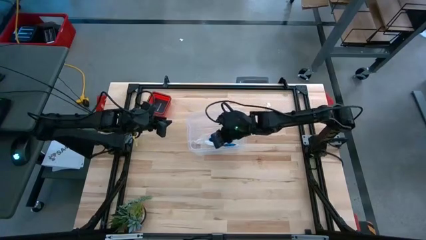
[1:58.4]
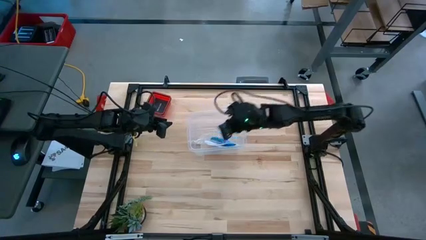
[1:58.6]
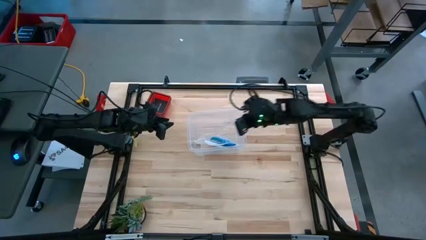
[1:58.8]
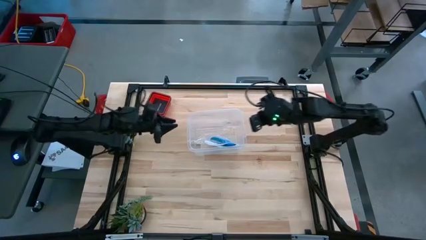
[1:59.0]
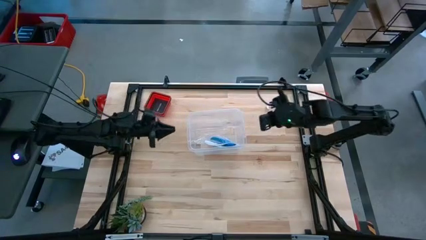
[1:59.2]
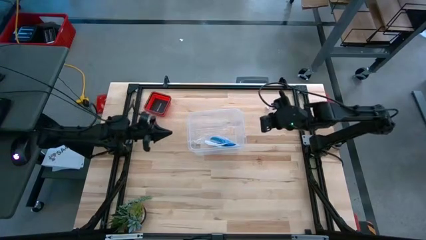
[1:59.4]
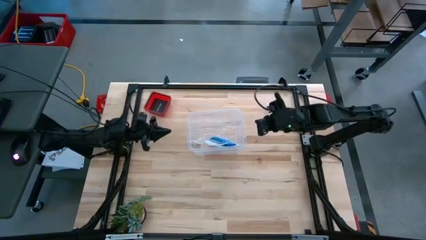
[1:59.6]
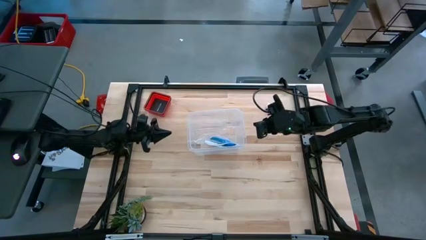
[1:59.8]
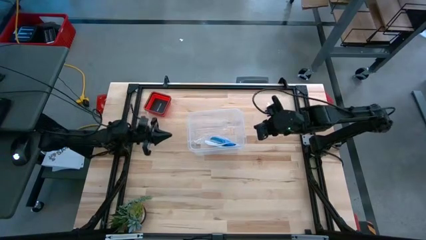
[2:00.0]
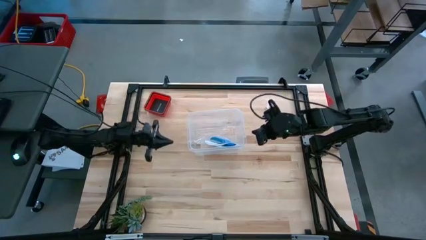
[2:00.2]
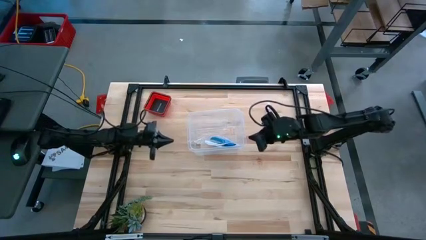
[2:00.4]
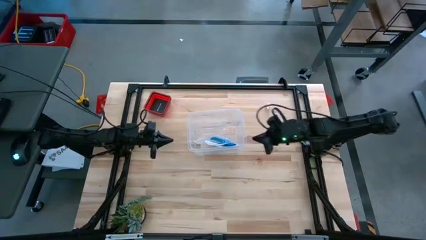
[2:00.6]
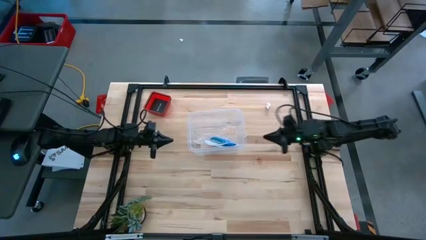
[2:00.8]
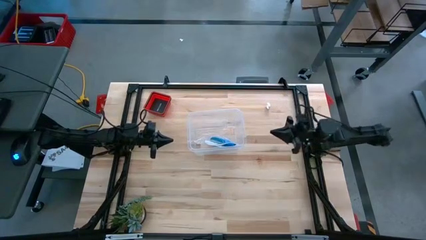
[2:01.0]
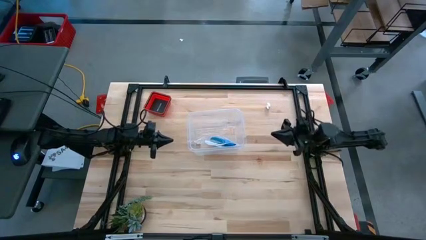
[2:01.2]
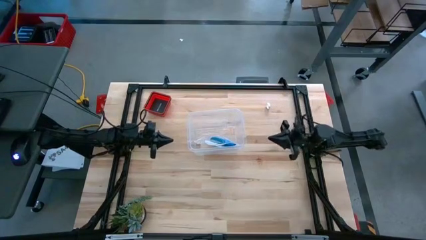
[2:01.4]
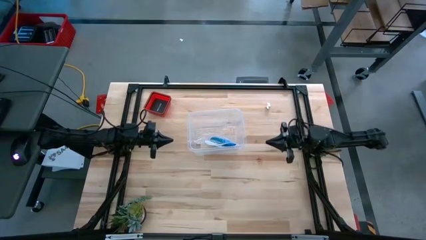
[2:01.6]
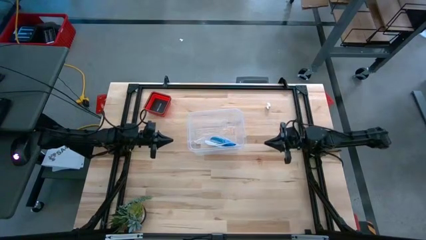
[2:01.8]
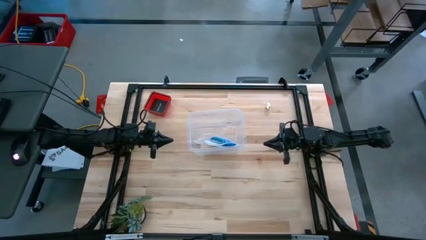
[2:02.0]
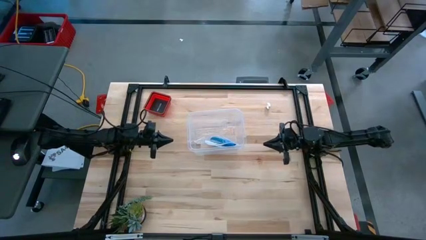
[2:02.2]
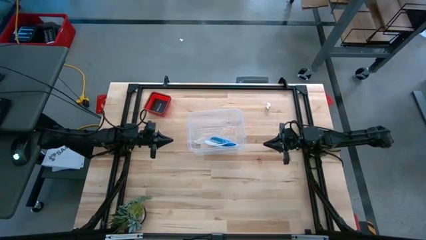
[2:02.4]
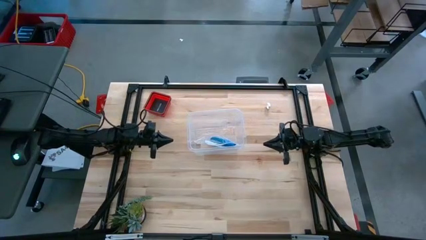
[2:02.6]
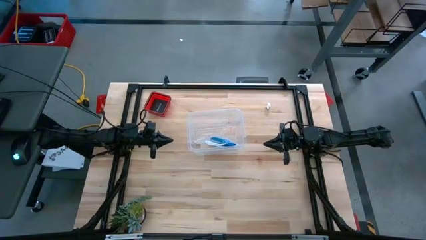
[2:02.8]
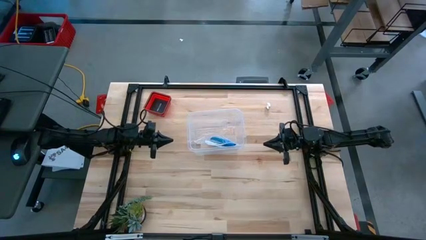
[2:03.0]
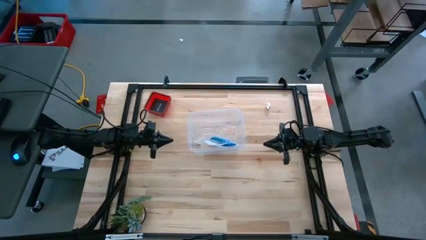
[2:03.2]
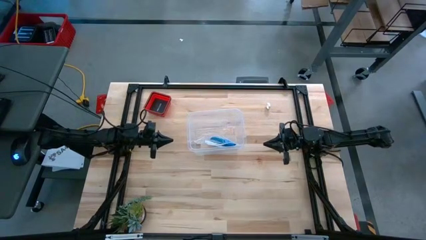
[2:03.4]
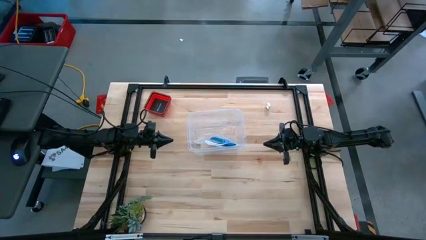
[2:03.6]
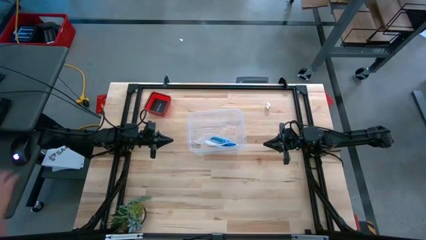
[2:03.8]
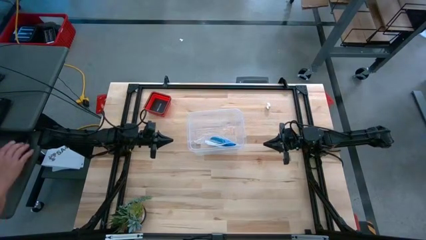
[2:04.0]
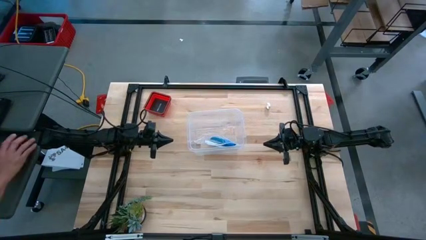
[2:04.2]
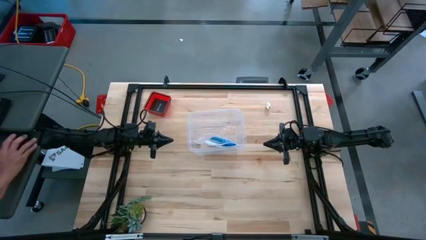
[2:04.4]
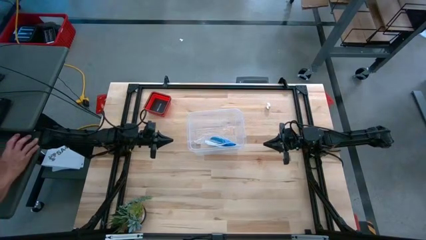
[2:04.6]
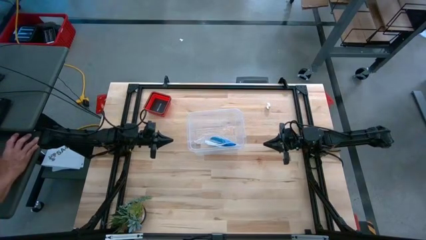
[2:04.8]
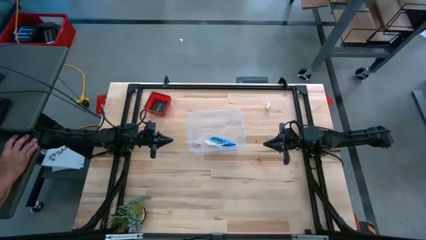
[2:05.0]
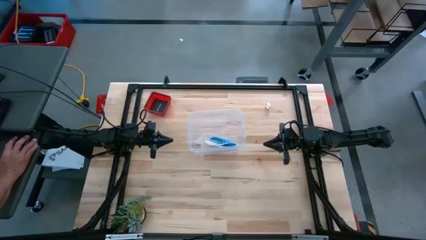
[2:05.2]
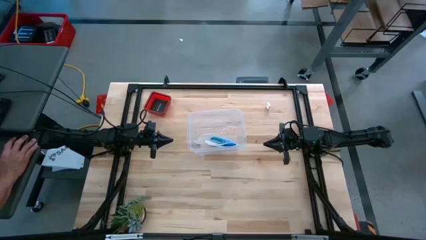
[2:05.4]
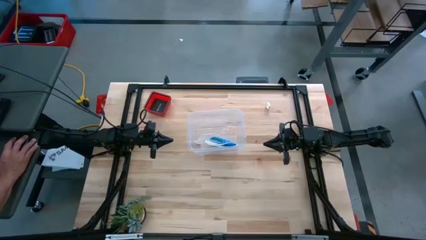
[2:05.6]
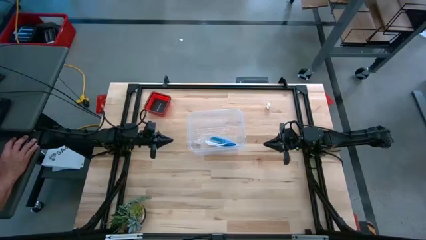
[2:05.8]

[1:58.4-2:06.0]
Task: Roll bandage
Return to Home Position

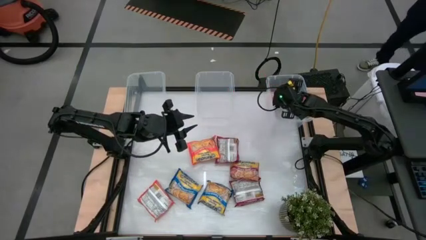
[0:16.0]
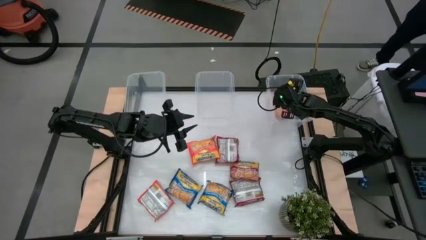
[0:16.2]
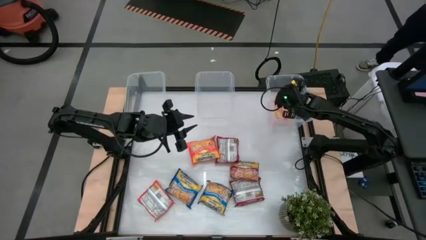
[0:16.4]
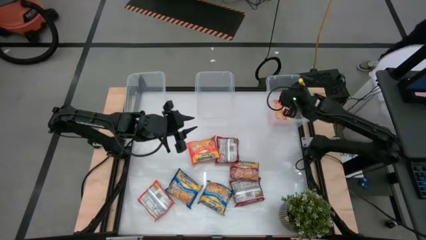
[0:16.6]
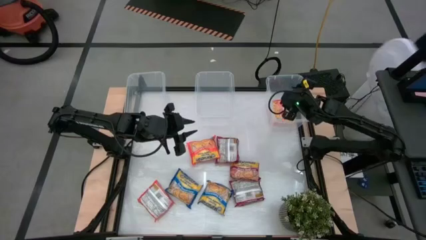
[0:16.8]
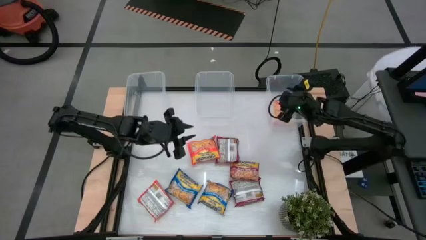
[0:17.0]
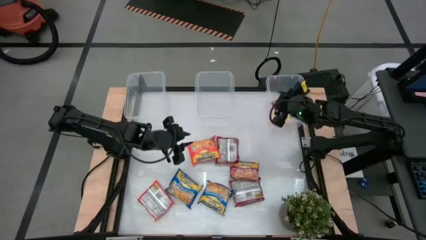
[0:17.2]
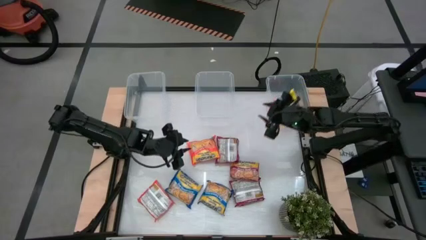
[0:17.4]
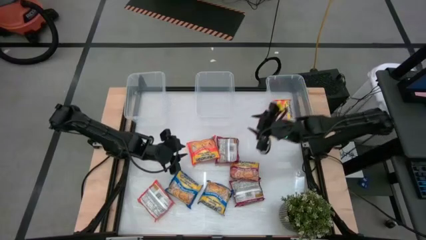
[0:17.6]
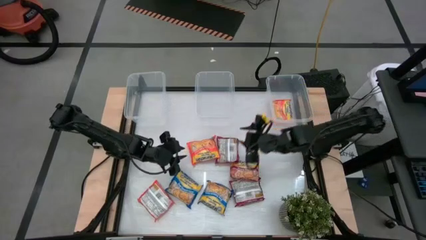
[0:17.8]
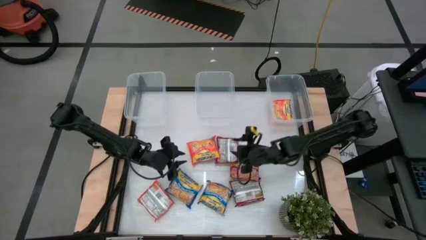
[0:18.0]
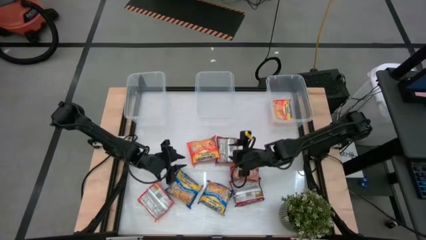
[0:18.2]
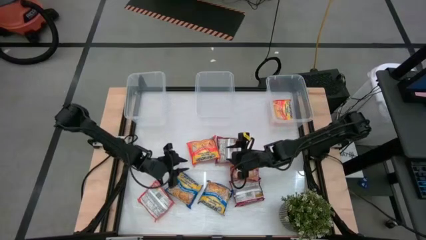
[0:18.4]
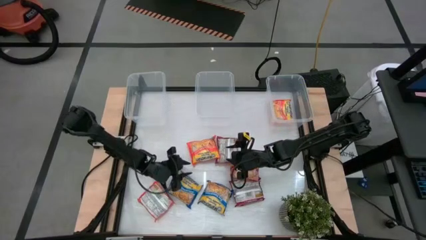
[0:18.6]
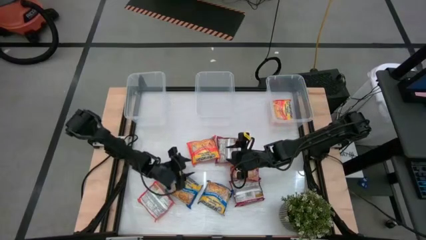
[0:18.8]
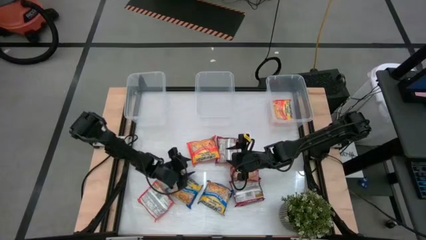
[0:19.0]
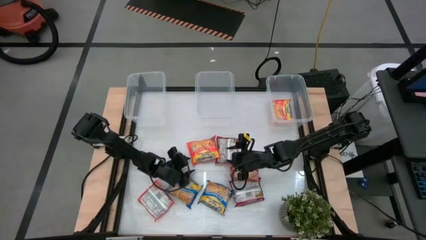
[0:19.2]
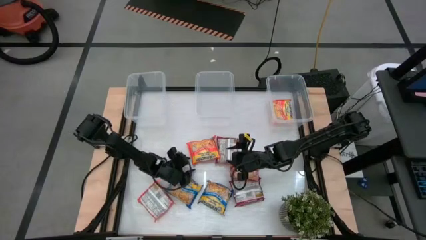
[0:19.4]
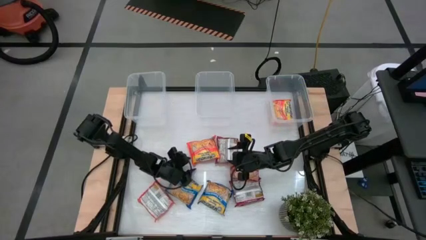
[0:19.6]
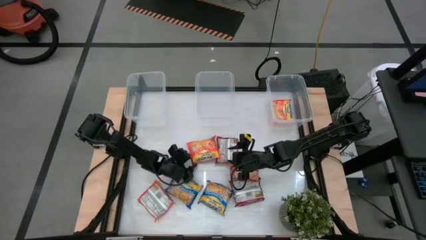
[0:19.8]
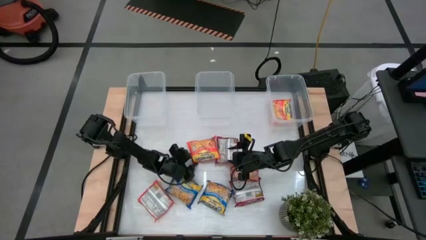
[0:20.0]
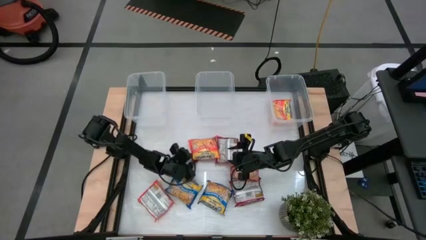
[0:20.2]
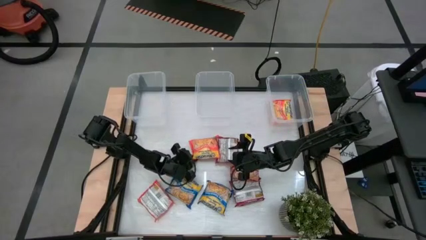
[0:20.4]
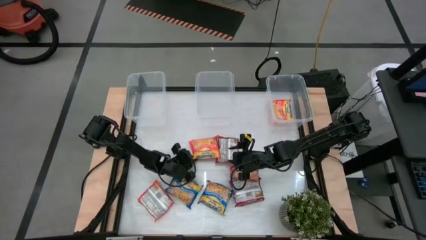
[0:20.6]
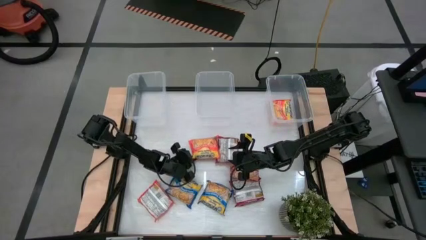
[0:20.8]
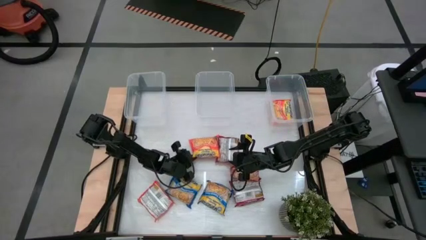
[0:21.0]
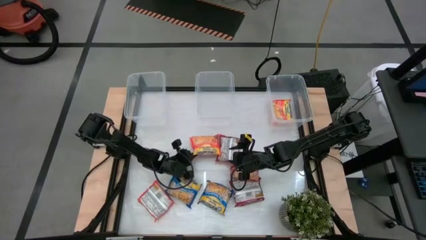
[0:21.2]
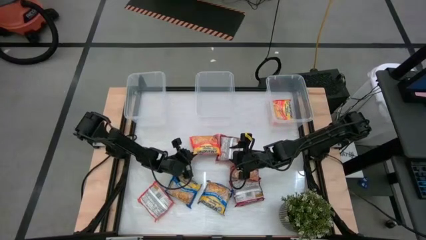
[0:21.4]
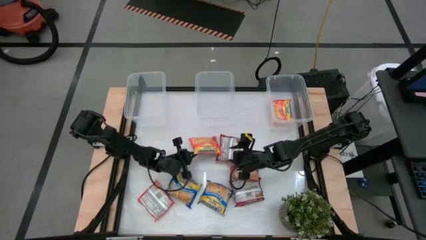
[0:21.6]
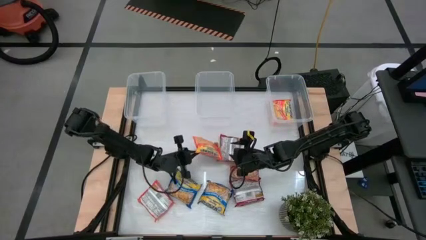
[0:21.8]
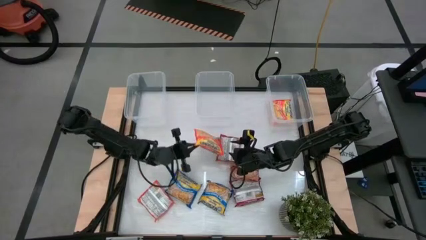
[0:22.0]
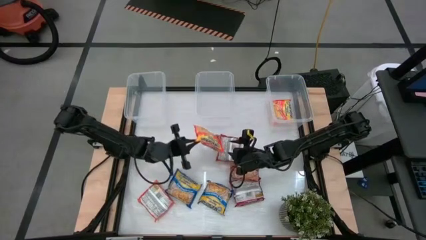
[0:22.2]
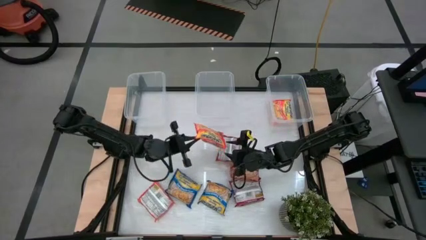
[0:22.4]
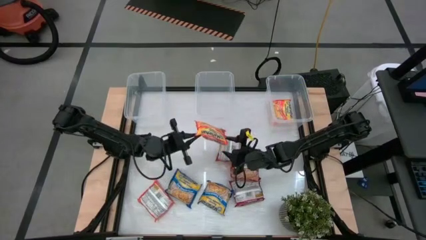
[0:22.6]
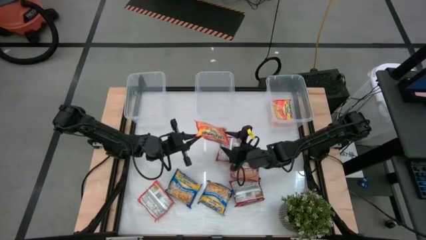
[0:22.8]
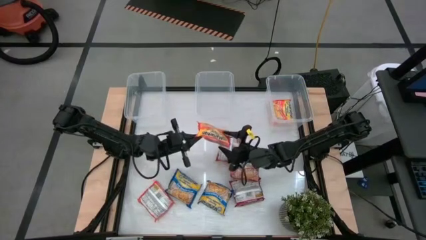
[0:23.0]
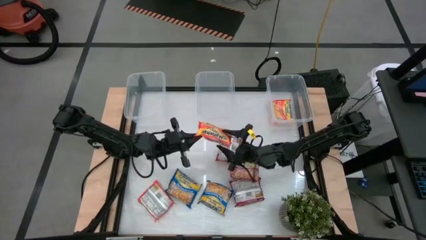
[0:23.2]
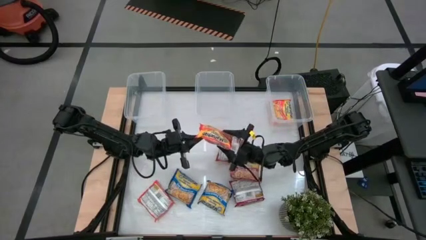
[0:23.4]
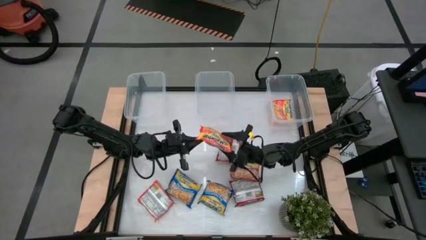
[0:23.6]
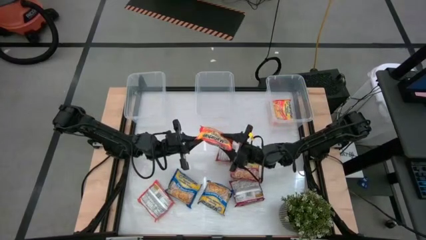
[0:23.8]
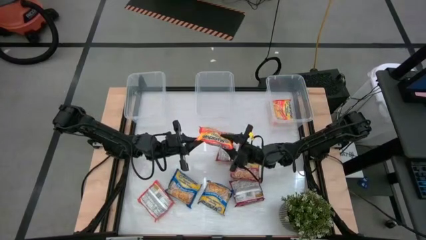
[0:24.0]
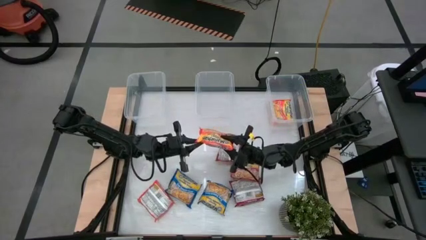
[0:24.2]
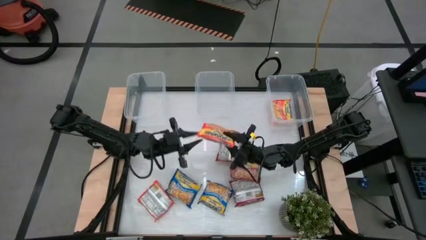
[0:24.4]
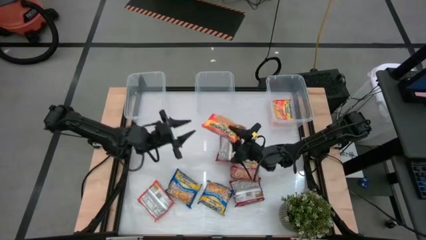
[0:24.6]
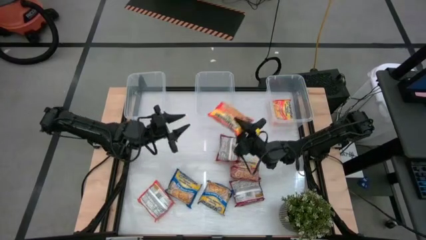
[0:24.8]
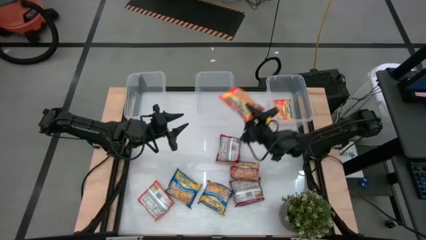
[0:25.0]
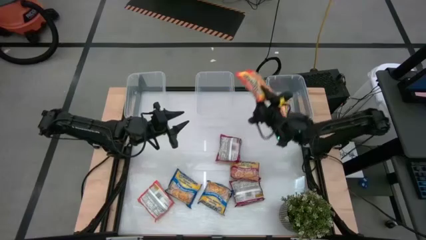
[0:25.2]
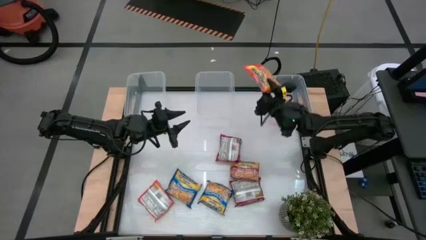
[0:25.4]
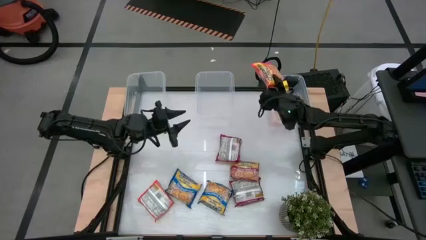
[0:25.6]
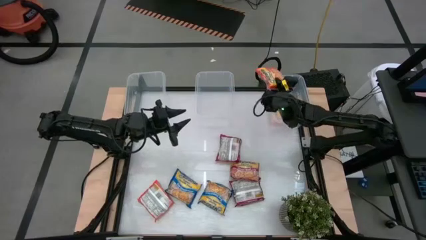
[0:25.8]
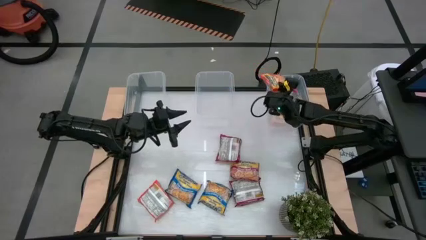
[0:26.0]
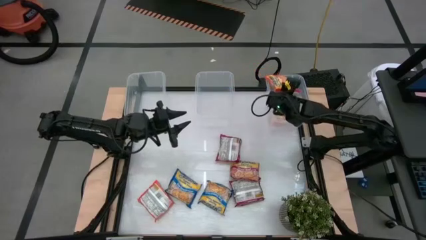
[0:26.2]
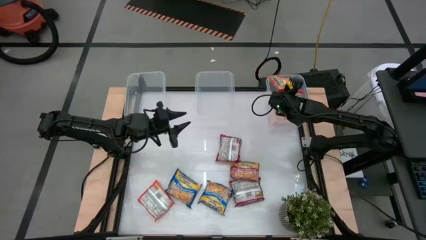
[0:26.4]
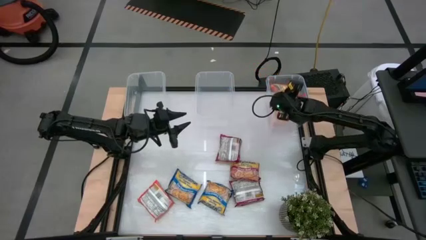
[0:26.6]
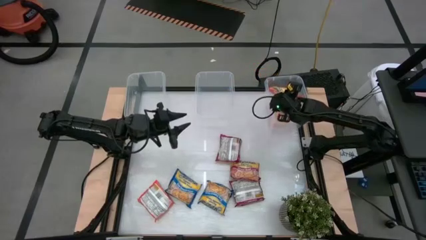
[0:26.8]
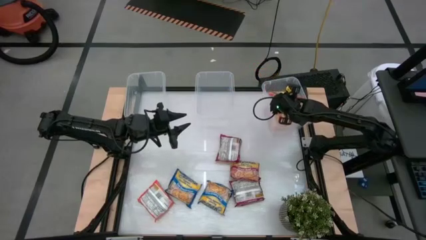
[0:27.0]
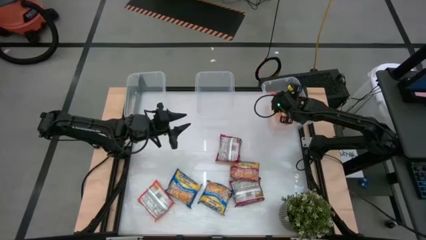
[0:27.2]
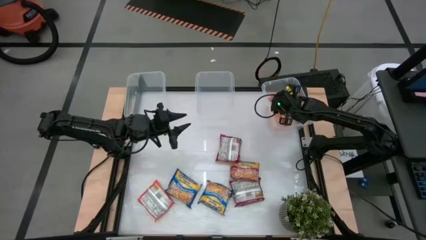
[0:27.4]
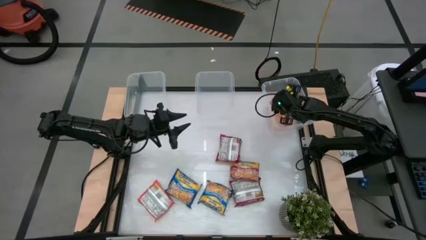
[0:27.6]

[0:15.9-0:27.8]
Task: Sort Maruchan noodles
Put the top orange noodle pack into the right transparent bin
